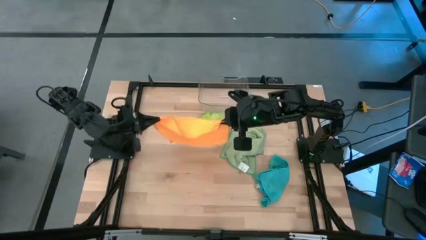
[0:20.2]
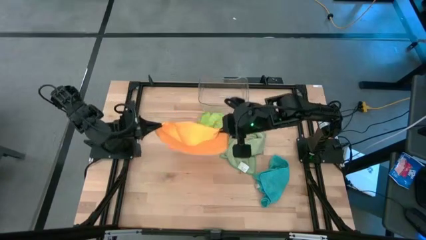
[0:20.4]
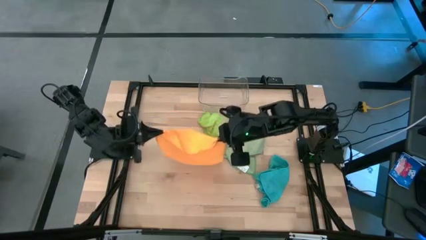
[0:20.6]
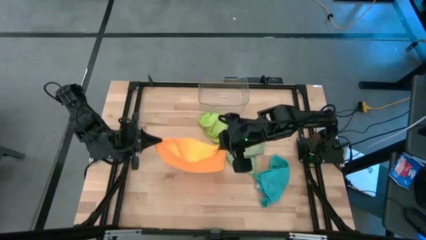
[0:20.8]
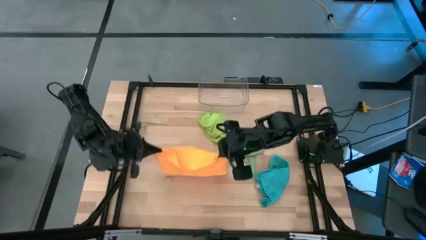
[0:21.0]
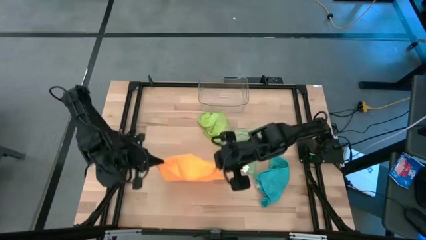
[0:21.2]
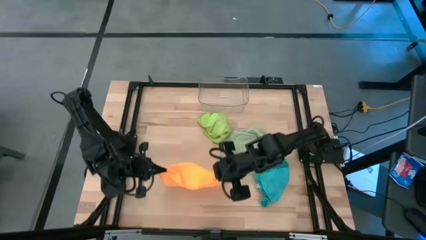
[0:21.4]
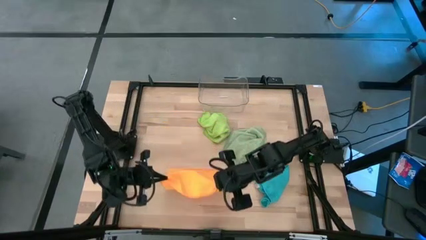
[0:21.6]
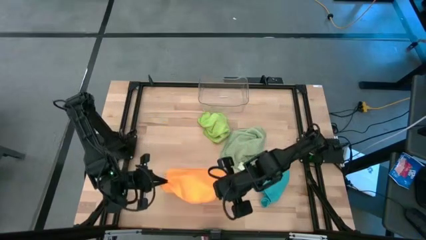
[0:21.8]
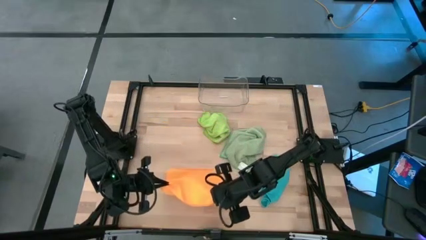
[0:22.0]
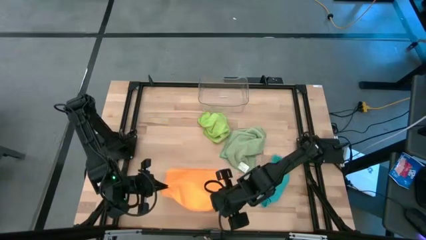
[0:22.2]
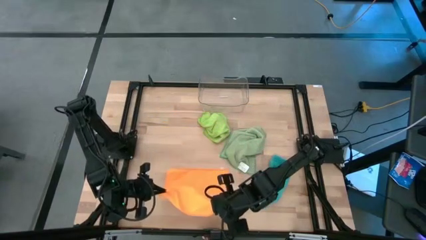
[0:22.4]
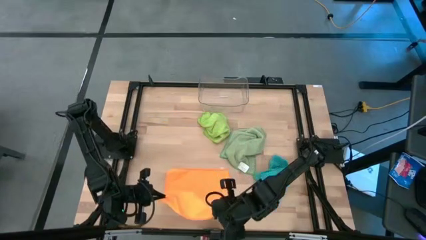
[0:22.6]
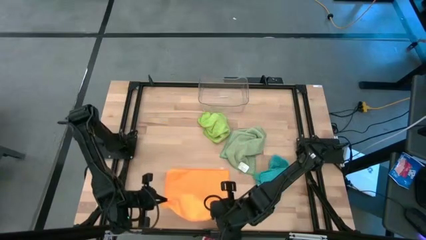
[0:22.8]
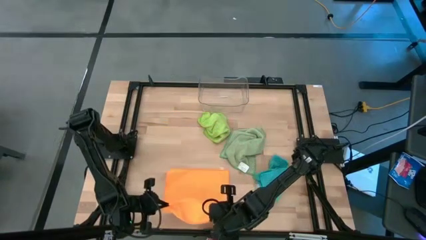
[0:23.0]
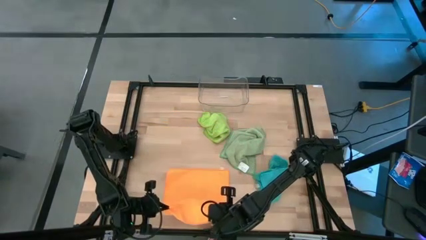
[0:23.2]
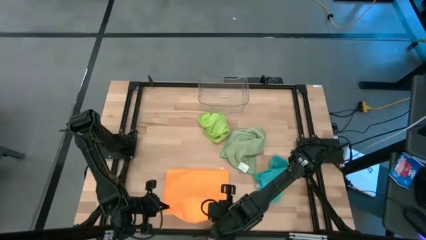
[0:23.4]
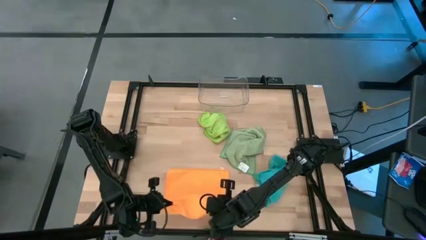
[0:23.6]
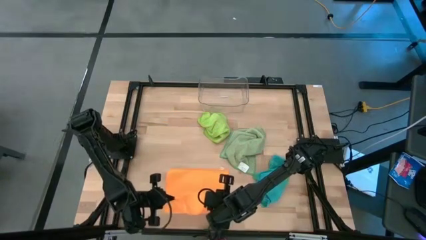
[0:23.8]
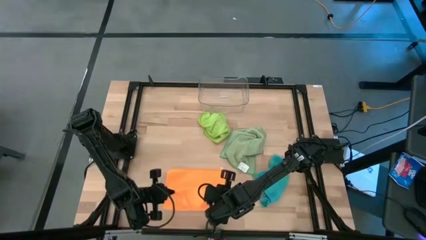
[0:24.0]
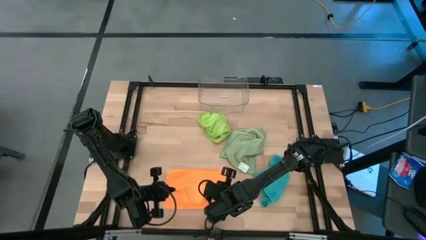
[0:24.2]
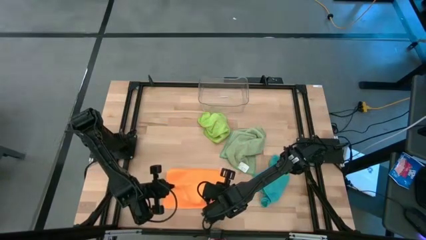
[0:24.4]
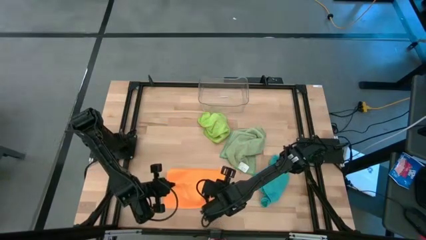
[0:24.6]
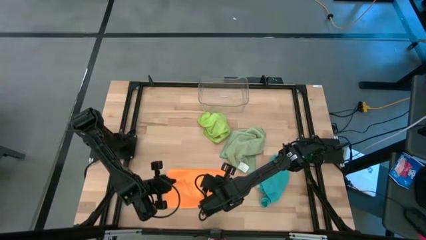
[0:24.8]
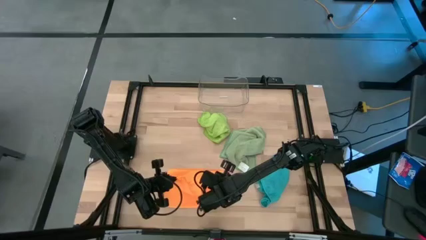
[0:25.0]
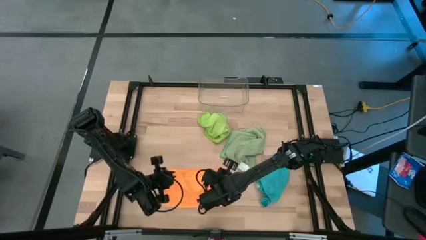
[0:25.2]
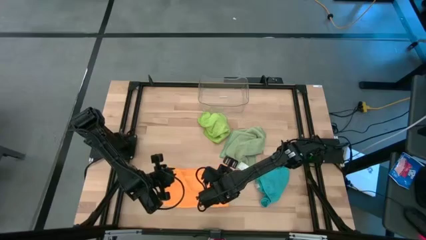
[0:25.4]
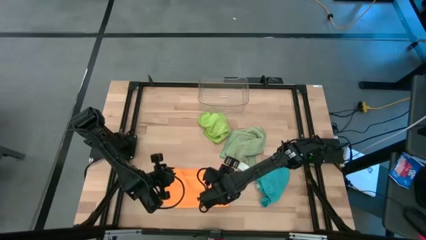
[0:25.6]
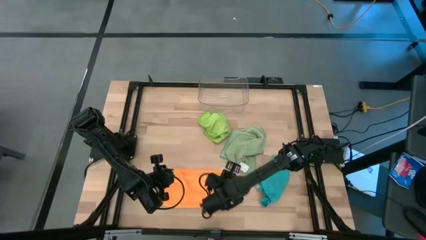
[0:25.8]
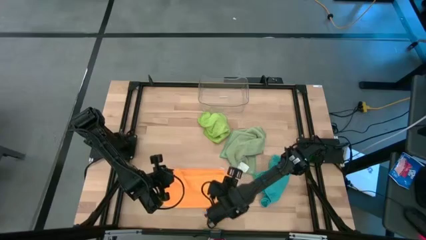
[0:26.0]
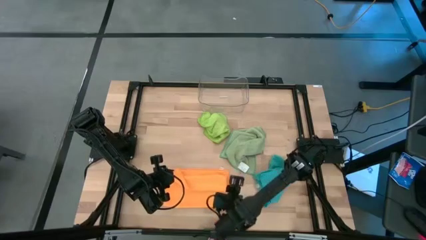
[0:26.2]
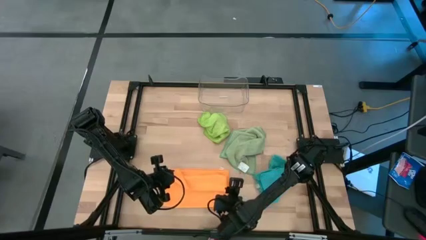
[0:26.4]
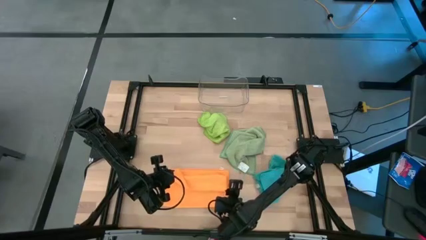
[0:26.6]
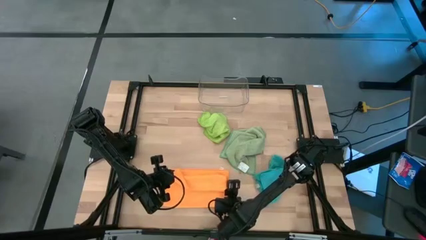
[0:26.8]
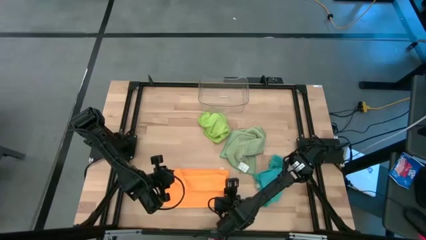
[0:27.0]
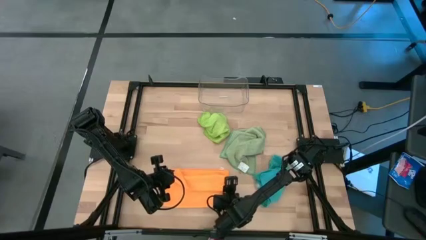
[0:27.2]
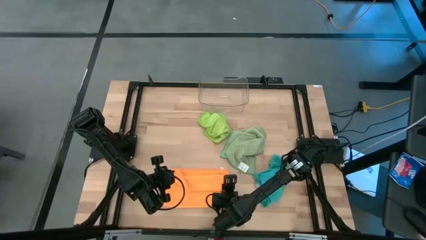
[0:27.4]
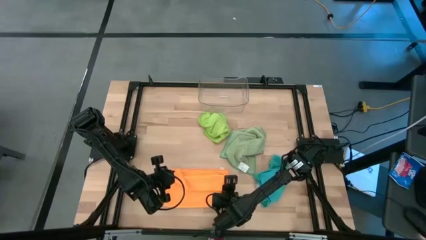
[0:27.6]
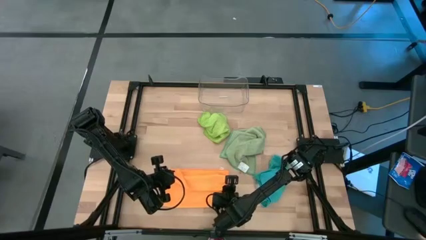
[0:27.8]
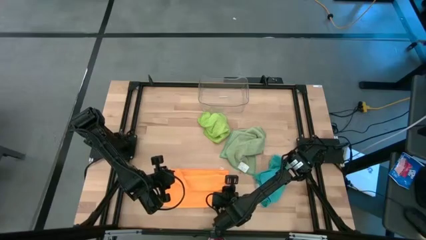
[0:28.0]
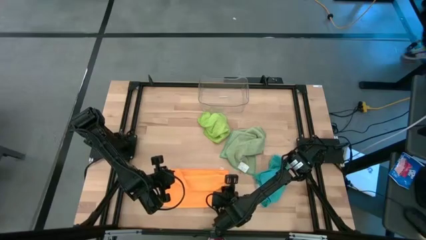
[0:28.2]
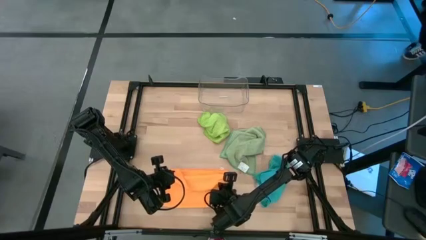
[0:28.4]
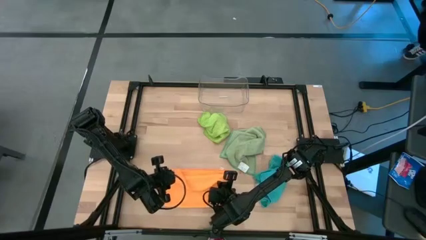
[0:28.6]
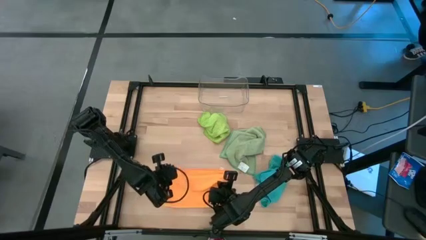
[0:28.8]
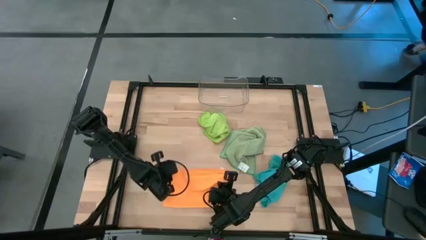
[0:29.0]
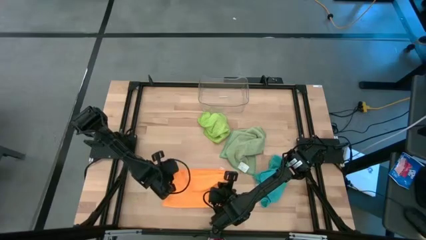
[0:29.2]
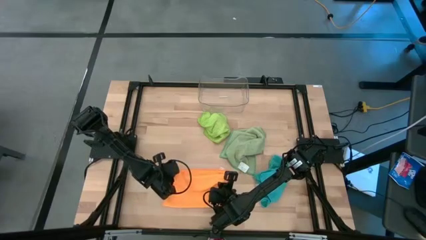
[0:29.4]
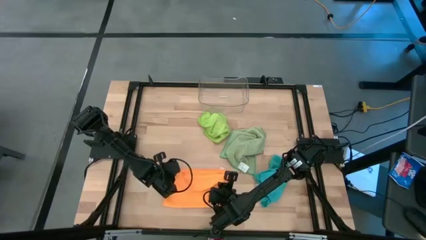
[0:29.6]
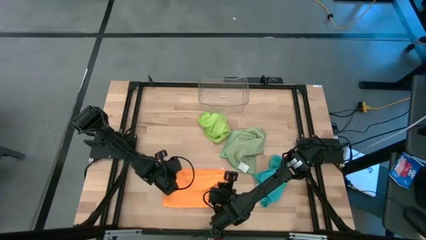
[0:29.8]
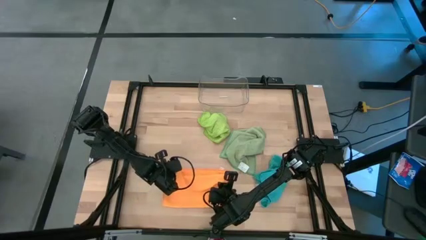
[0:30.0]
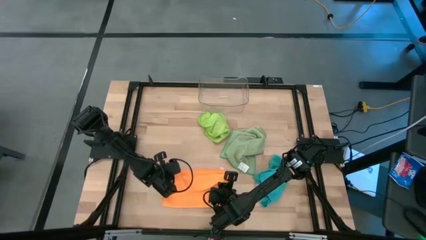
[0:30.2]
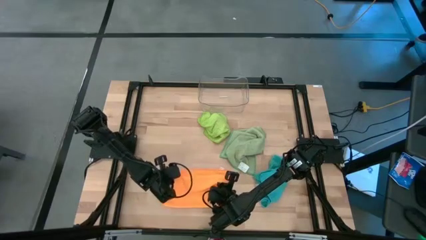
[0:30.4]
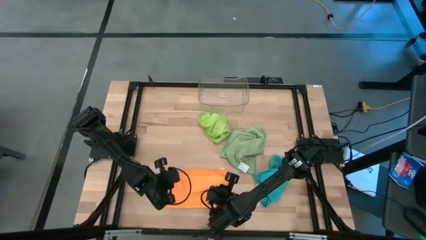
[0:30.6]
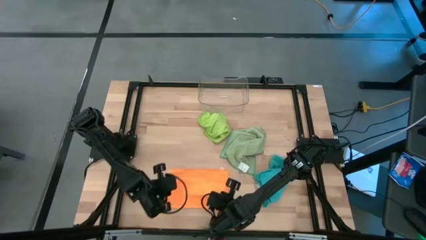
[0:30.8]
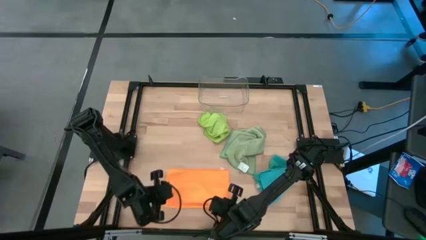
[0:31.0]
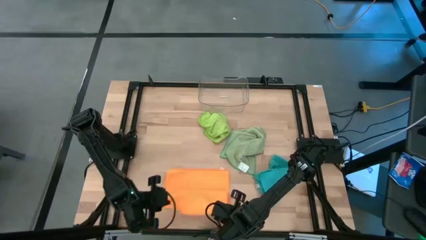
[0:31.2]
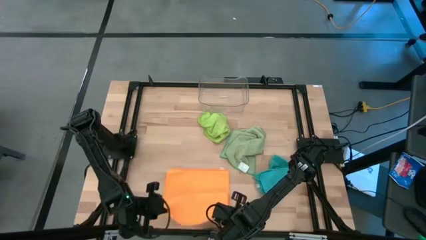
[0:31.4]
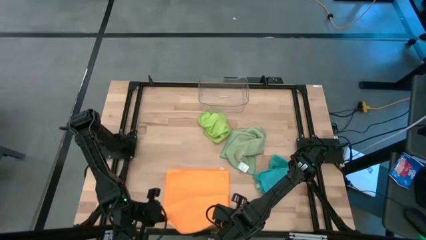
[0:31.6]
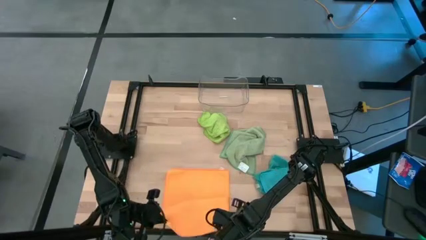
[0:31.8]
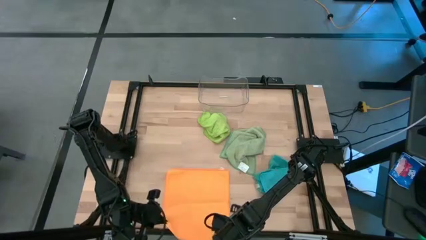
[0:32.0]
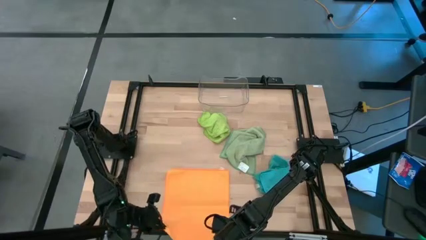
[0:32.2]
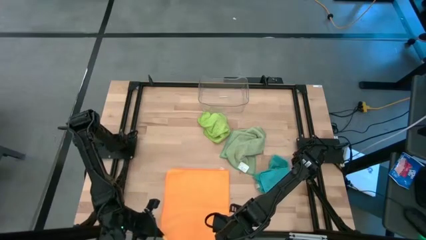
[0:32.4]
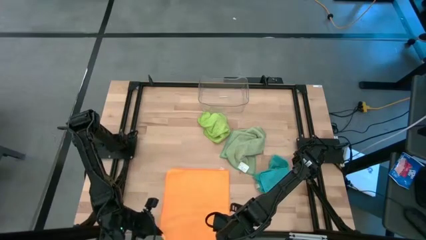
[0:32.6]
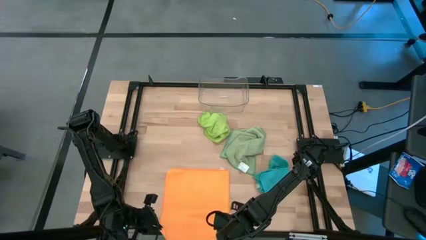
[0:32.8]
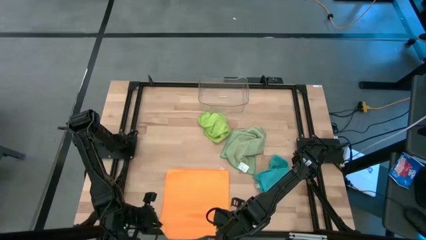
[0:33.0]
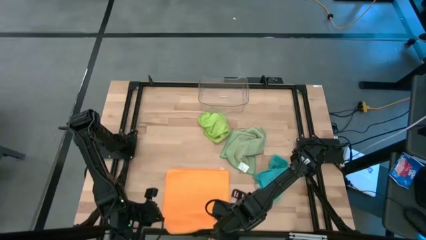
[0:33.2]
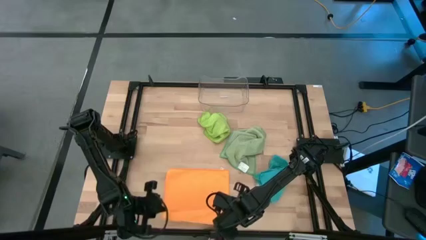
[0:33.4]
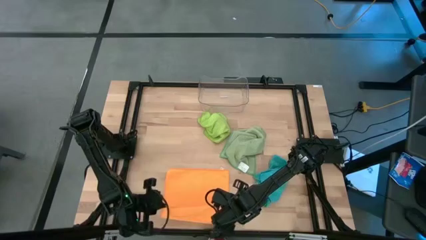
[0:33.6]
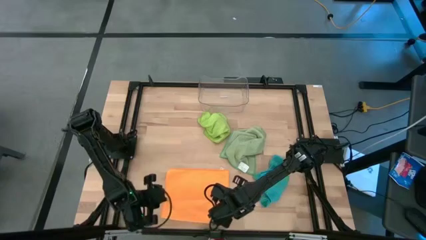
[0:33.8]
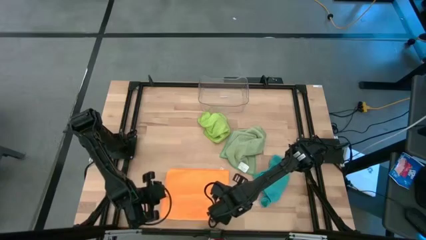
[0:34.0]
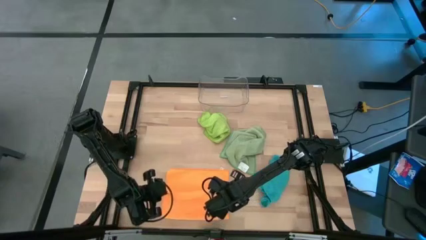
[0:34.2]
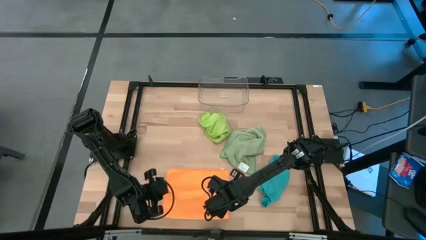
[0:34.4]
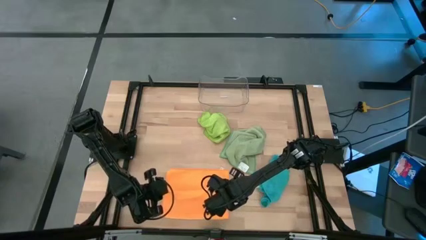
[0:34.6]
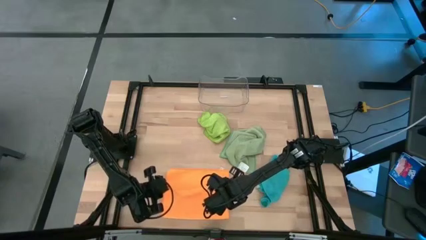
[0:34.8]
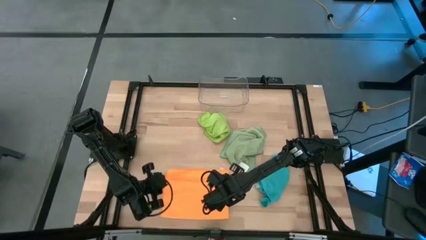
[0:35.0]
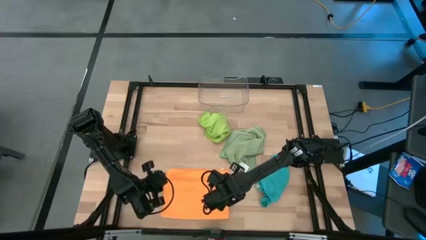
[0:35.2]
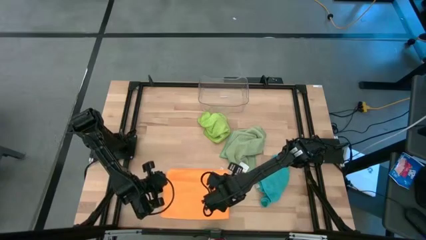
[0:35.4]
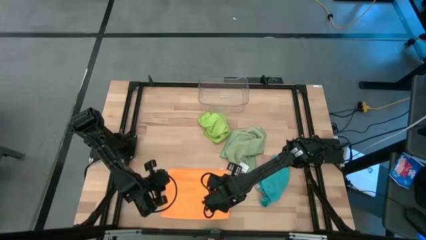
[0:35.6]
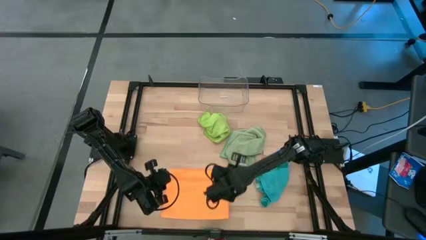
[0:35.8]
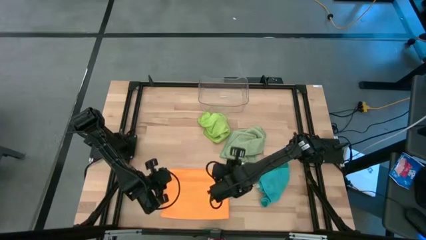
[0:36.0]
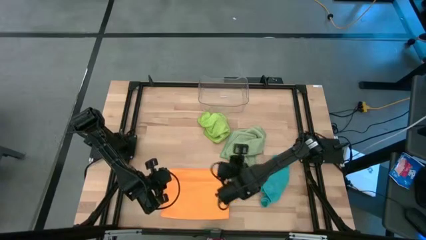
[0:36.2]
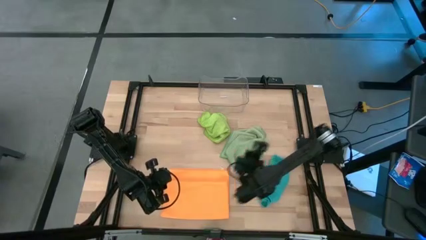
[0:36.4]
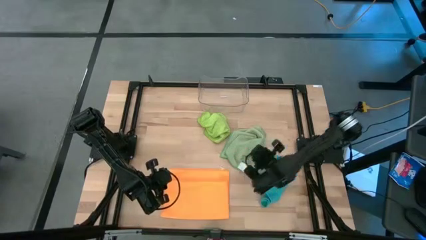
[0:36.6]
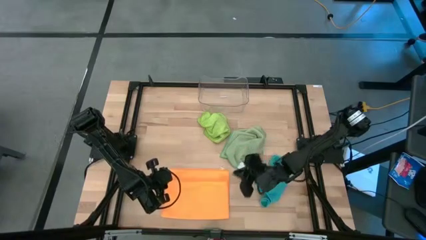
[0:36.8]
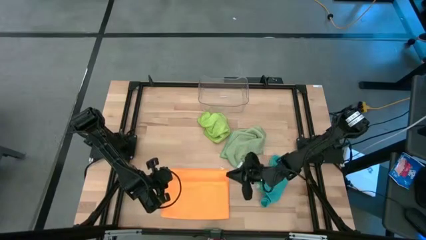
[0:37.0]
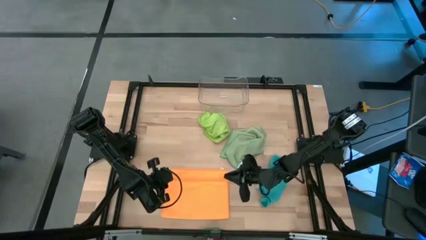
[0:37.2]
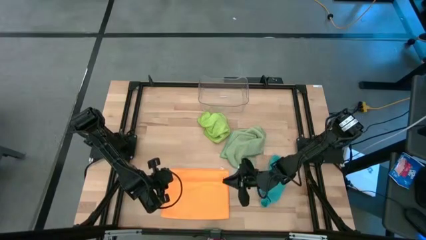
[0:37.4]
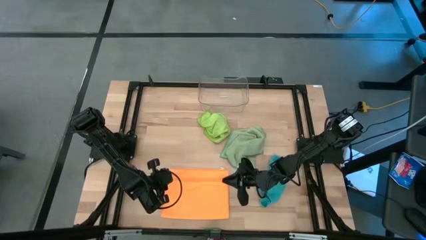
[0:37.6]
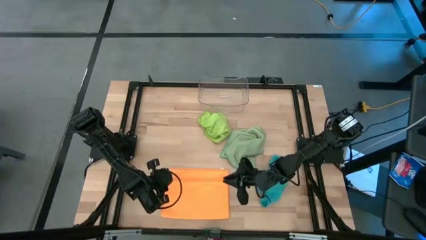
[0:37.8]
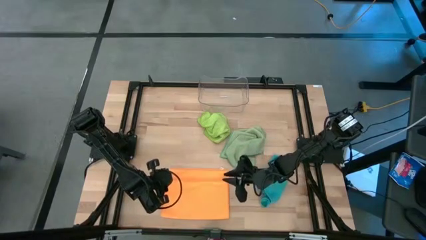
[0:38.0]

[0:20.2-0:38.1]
Task: Fold microfiber towels
Fold the orange microfiber towel
